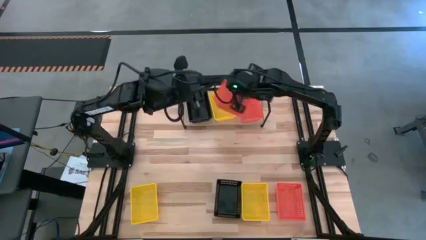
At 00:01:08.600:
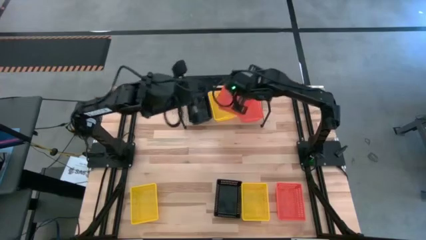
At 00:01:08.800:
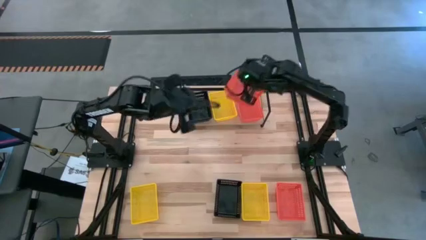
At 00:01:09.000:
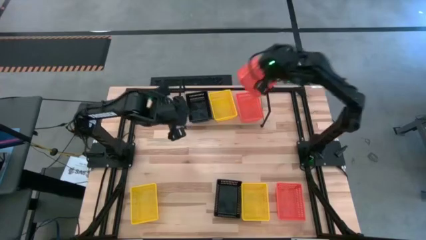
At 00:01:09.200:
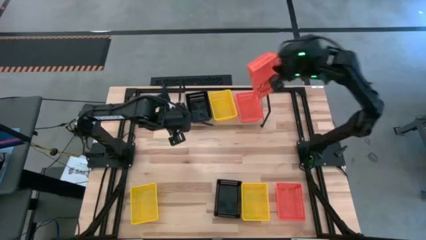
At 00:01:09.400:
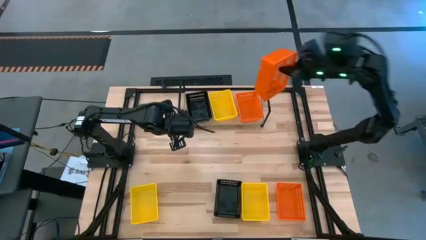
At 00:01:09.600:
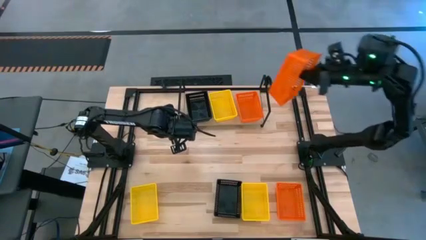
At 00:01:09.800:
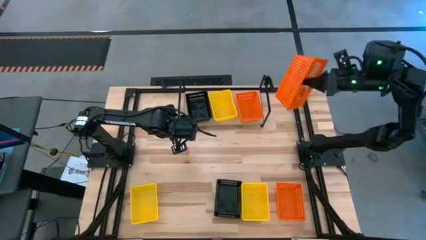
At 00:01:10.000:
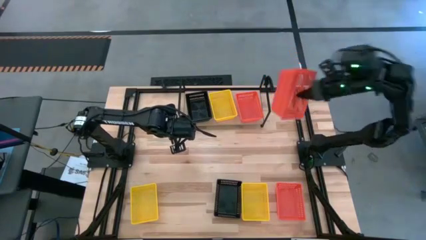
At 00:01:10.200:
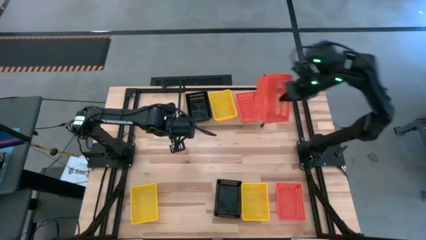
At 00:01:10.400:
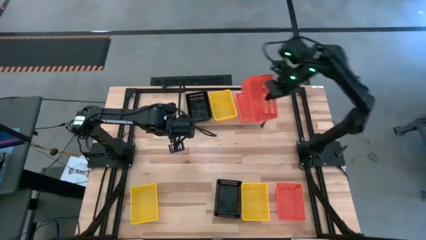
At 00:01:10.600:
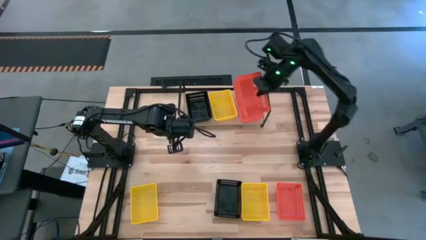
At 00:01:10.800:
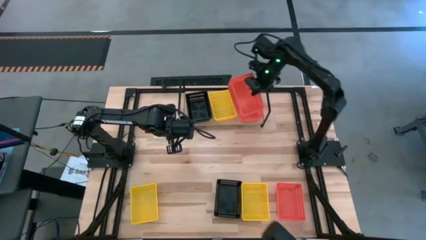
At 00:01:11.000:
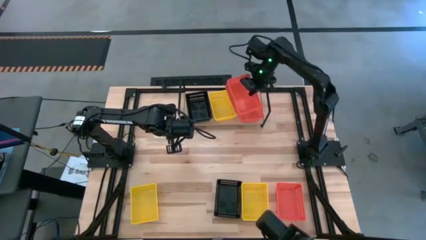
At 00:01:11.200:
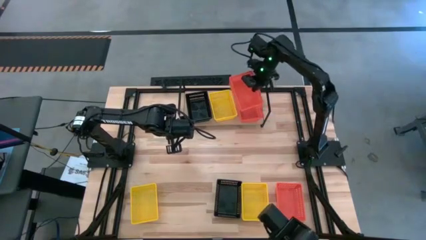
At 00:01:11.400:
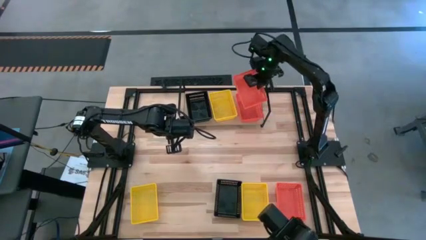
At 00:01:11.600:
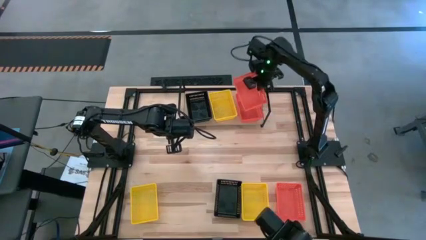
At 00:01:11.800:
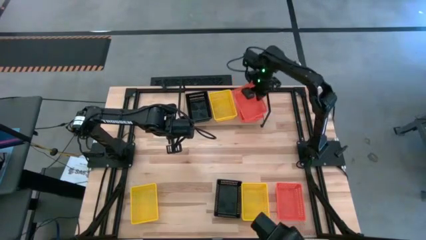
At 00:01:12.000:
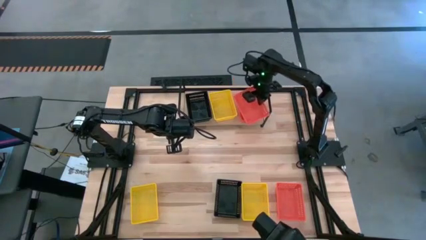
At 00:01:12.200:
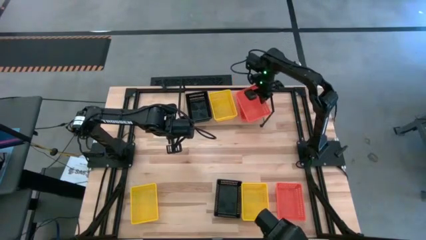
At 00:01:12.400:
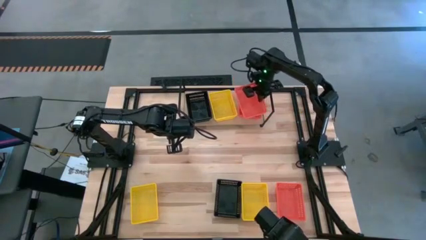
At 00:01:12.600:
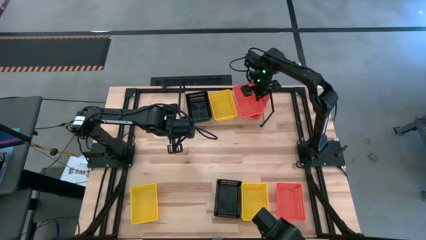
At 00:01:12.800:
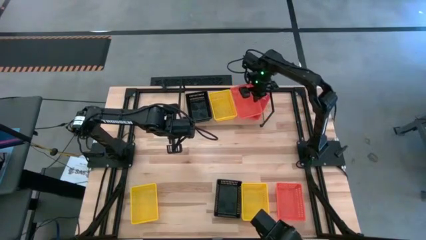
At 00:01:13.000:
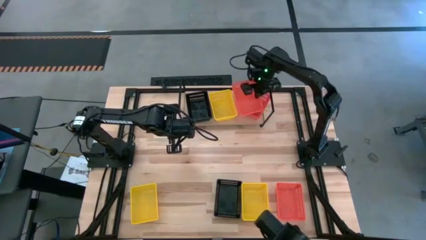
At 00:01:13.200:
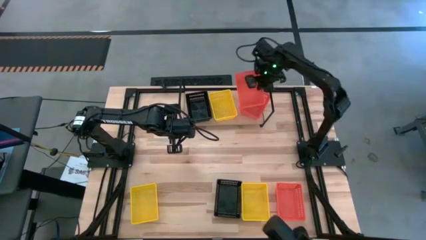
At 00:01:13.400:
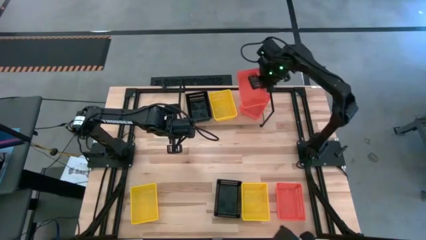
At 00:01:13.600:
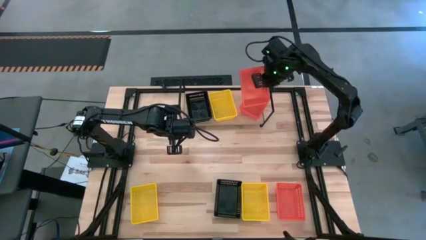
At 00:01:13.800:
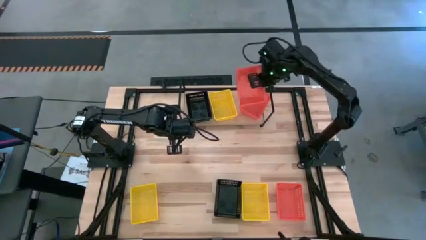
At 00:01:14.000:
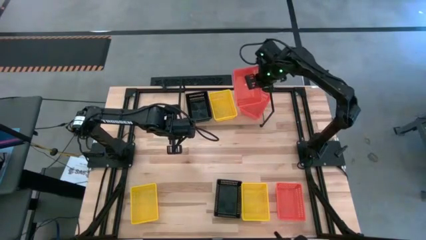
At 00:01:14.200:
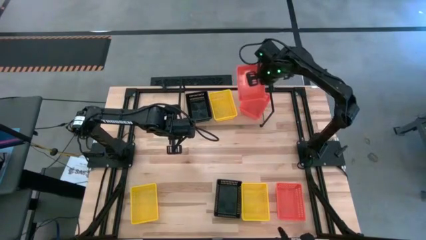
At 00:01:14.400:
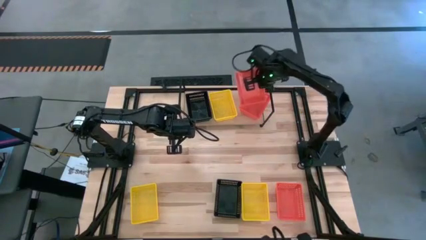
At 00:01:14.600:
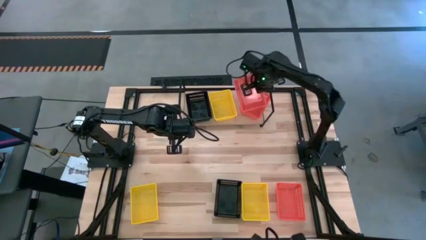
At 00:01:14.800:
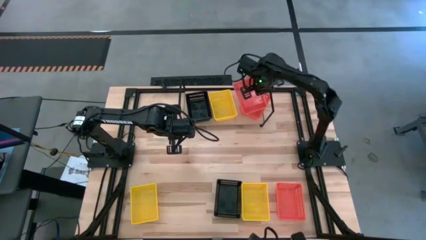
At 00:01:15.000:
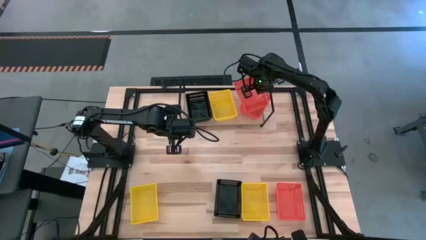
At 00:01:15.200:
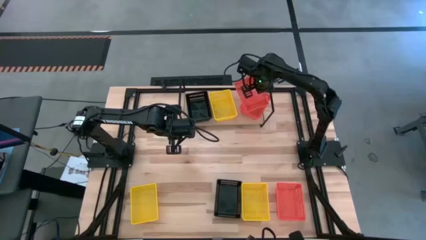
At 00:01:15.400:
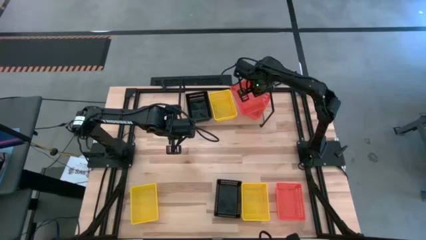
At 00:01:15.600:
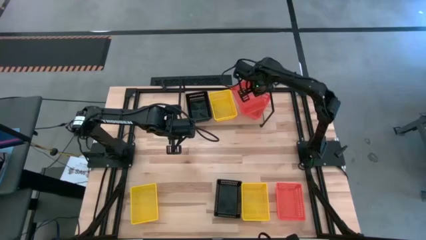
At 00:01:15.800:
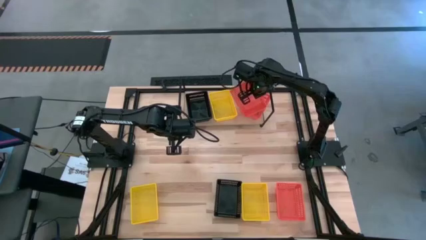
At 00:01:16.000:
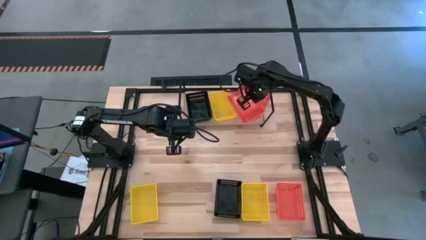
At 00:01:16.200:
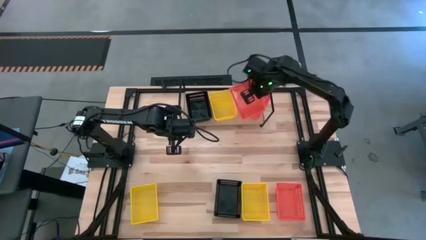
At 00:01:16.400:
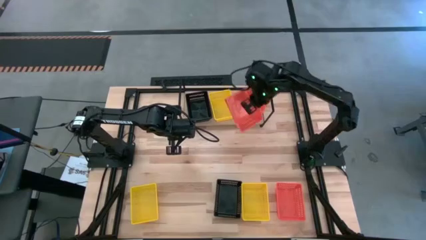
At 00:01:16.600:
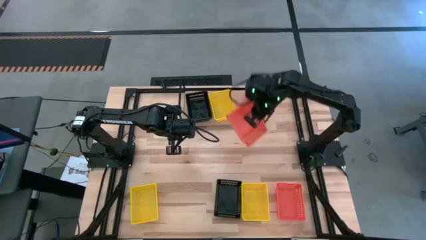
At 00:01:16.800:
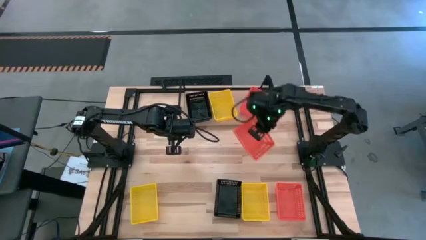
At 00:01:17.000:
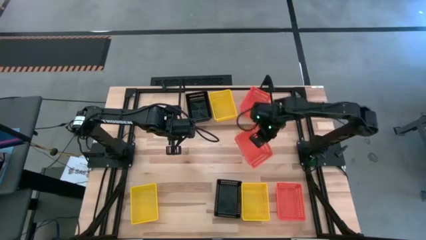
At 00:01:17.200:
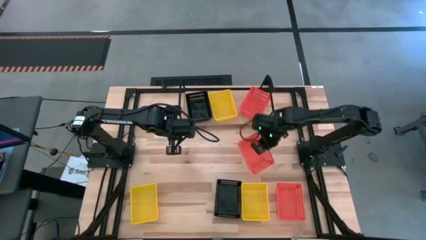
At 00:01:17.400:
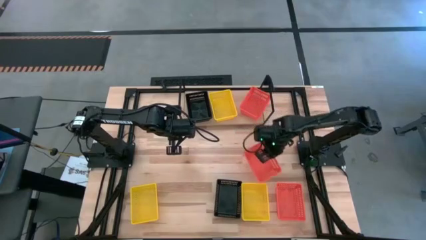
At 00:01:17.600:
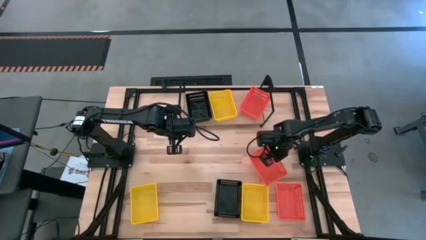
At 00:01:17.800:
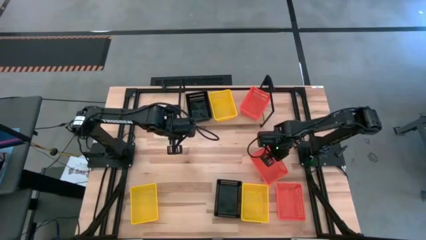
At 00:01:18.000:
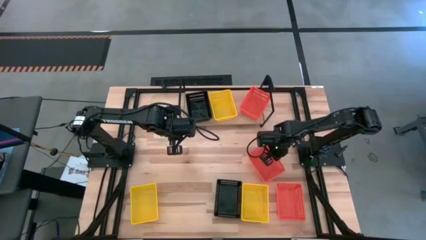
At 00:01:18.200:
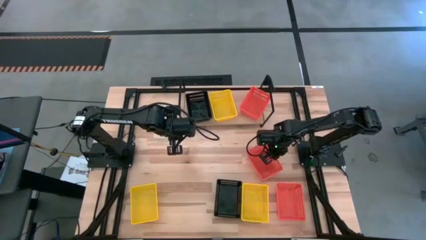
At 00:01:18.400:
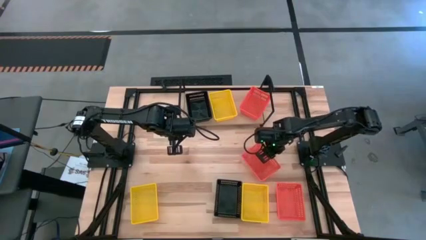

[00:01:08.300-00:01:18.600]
Task: Stack baskets on shelf by color
Stack the left orange bin on top of the other orange bin on the shelf

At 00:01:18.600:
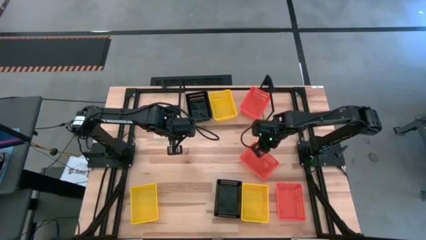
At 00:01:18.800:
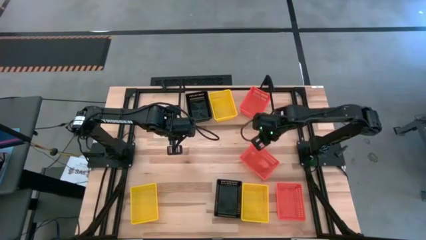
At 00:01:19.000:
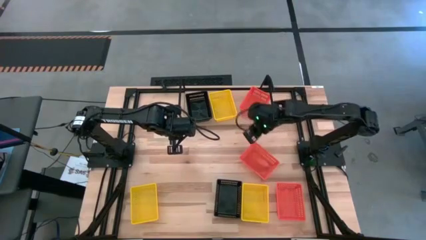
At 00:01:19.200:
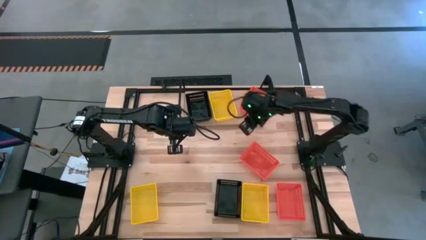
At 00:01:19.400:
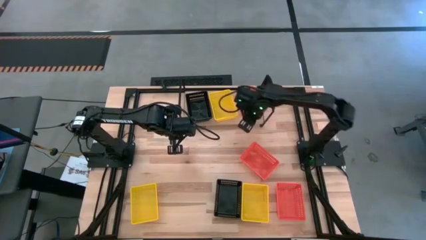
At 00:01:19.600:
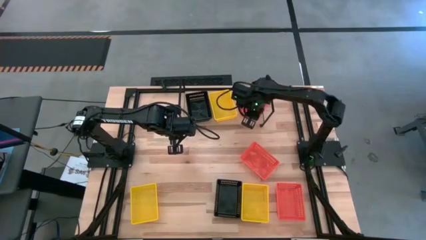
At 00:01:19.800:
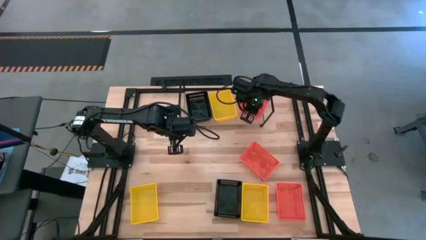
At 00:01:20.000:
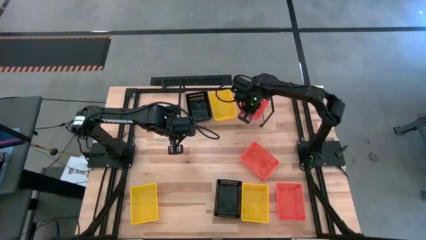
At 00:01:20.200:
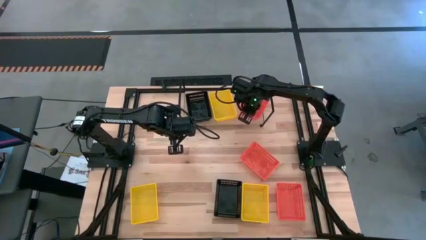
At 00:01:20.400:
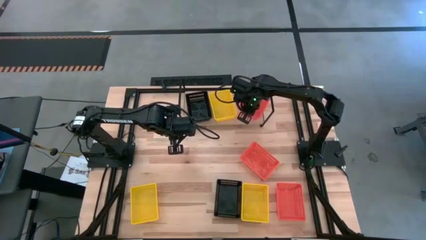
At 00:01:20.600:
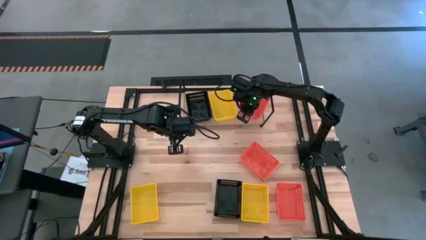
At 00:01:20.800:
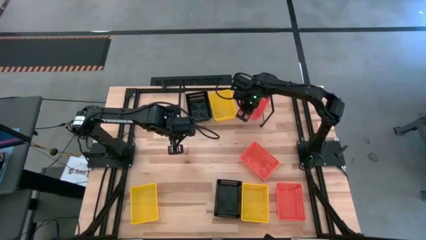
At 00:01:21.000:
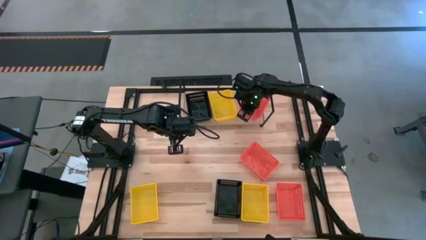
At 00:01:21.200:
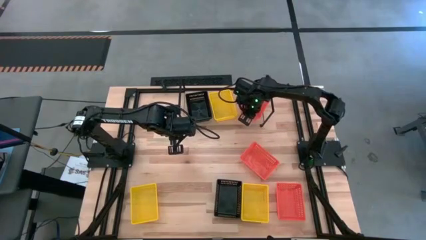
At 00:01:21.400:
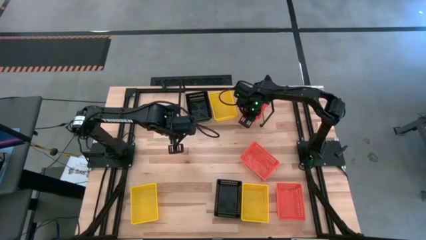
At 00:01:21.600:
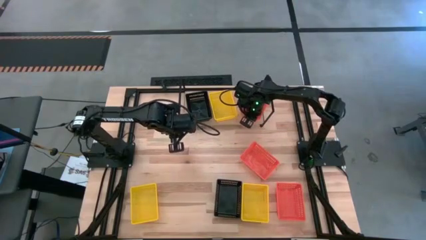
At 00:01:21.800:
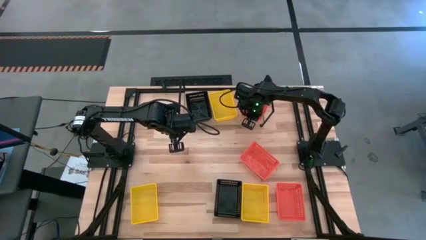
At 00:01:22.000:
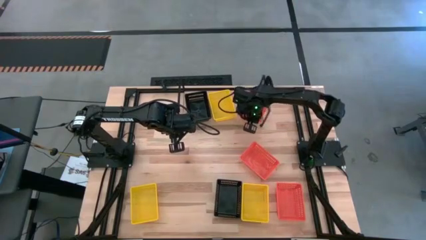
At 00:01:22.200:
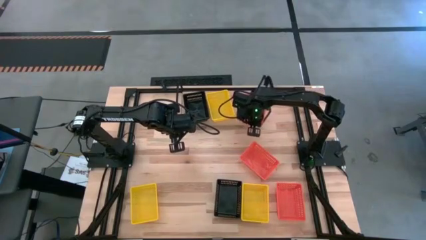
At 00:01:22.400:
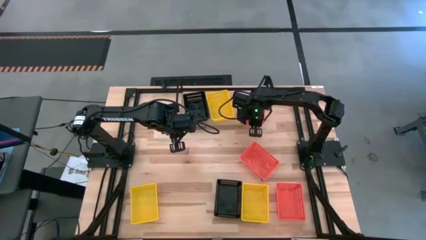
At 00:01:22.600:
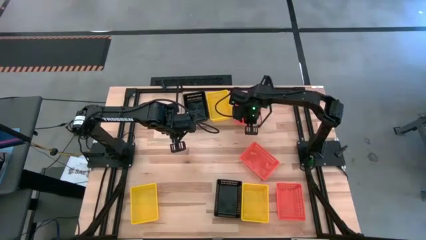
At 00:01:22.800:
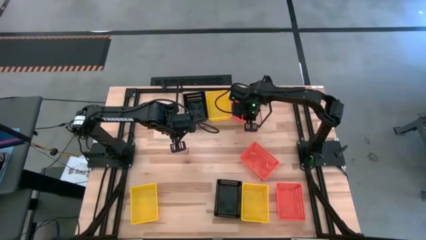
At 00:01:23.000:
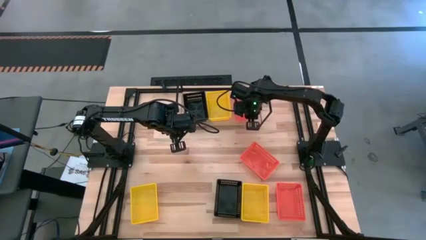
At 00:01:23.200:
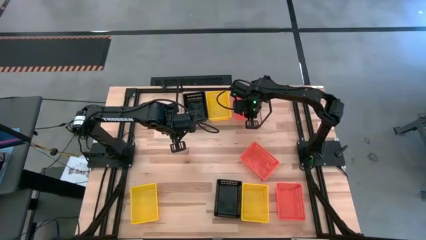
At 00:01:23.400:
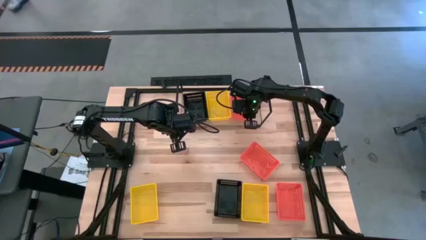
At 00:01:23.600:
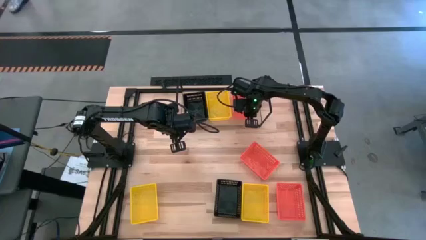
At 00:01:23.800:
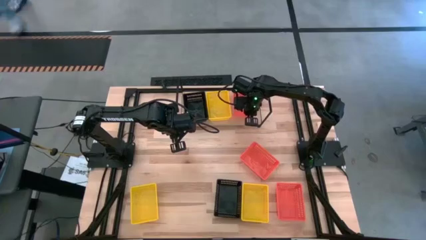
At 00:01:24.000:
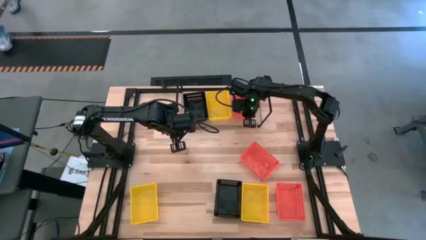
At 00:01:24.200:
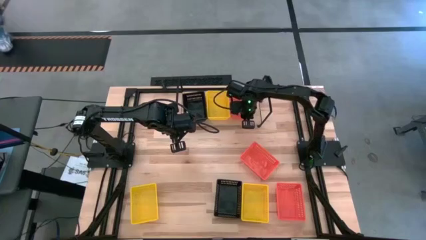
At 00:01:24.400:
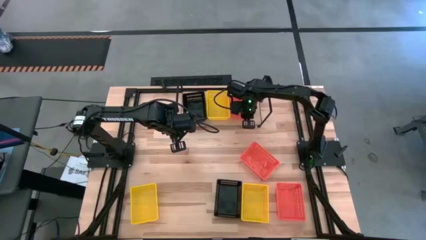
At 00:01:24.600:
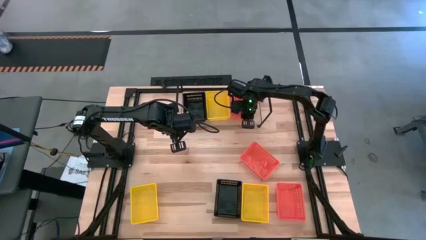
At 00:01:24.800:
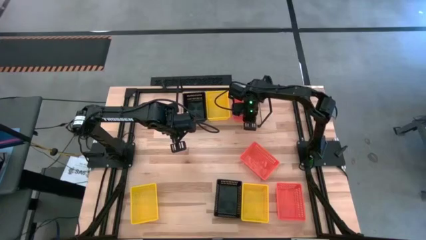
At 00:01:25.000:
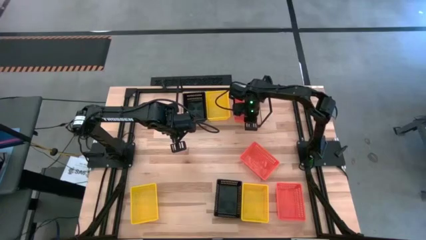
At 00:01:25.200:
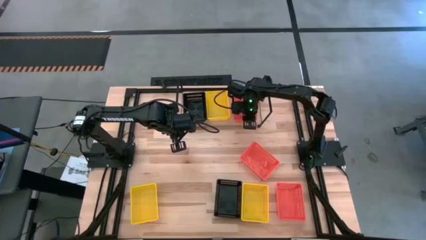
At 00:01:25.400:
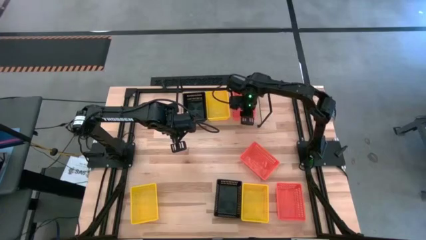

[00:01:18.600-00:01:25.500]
Adjust the orange bin on the shelf
